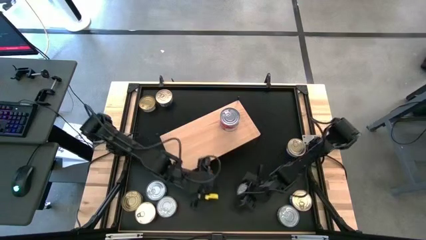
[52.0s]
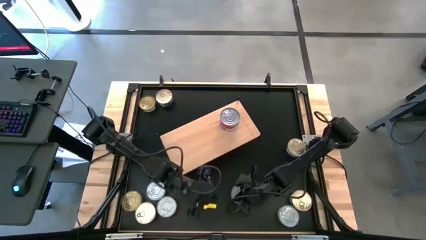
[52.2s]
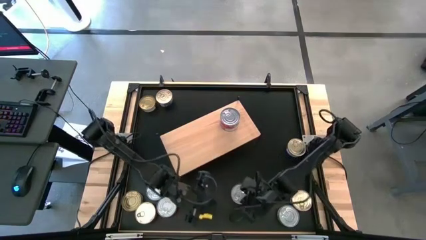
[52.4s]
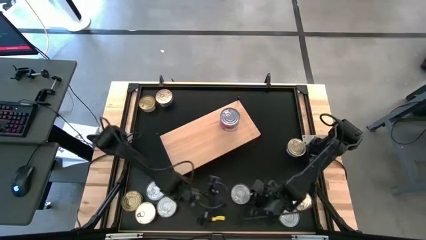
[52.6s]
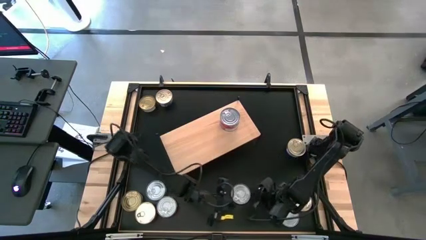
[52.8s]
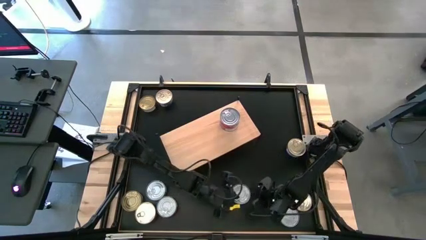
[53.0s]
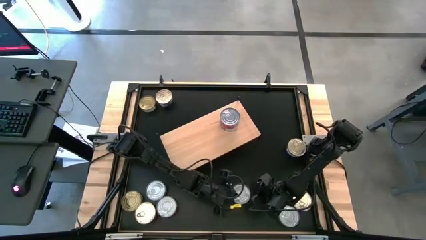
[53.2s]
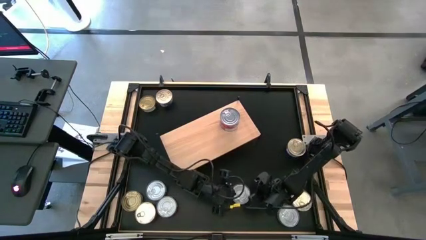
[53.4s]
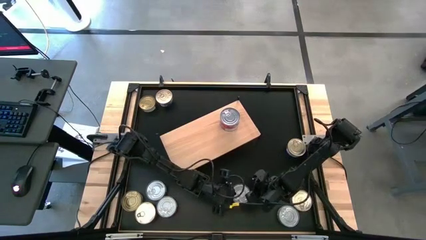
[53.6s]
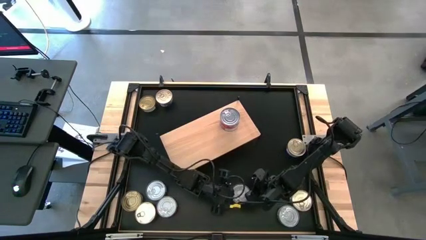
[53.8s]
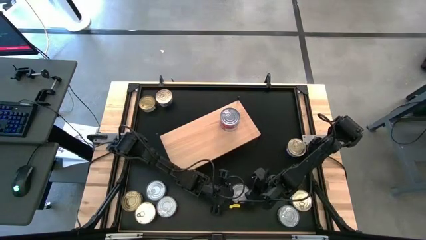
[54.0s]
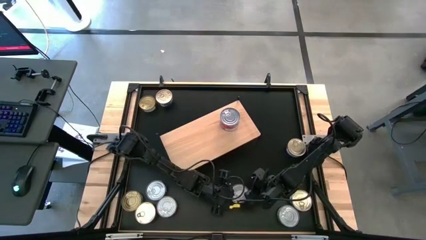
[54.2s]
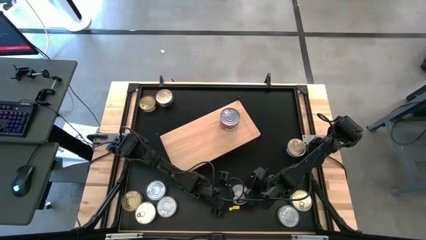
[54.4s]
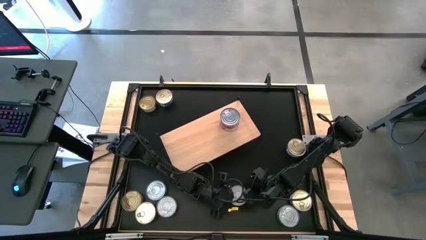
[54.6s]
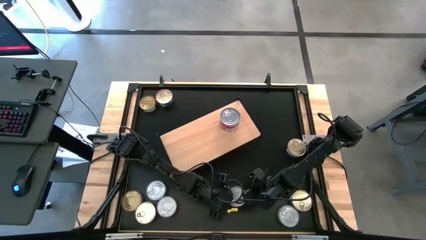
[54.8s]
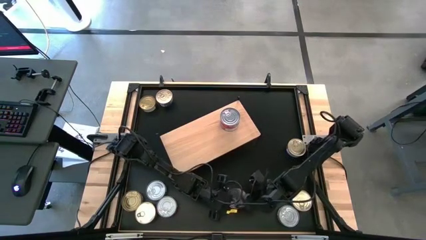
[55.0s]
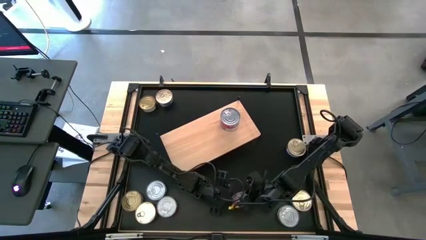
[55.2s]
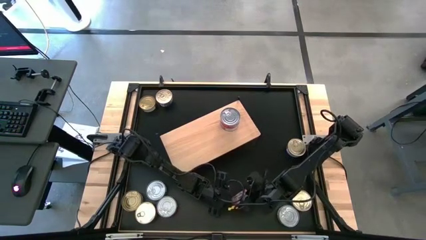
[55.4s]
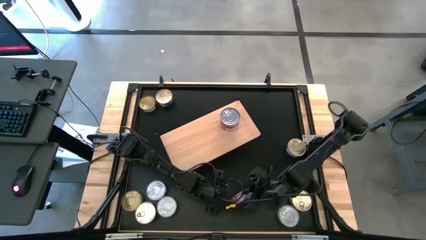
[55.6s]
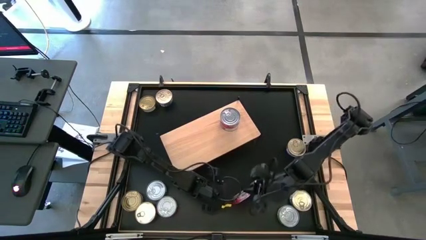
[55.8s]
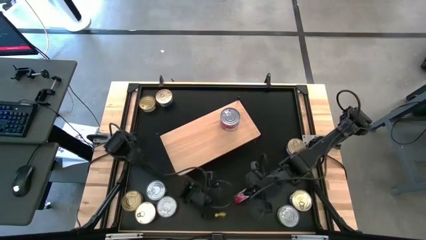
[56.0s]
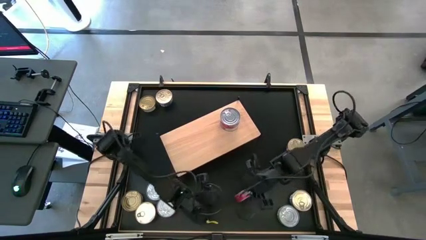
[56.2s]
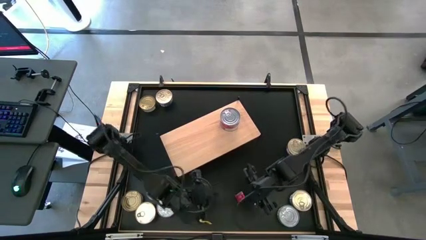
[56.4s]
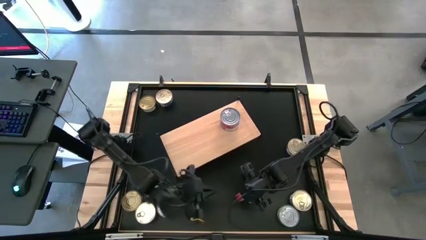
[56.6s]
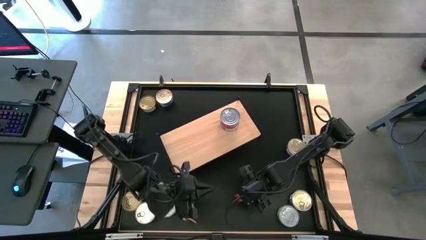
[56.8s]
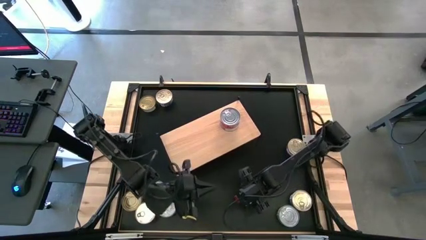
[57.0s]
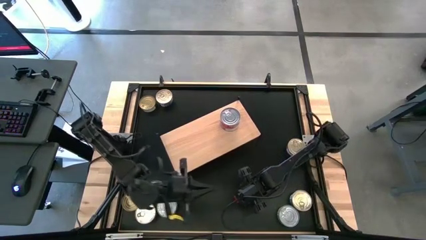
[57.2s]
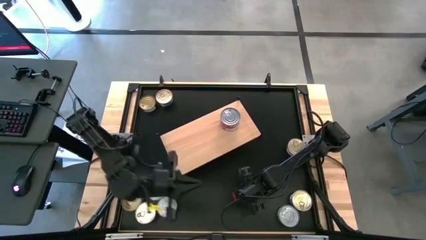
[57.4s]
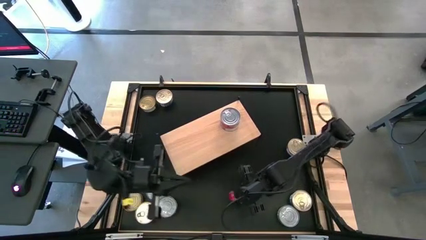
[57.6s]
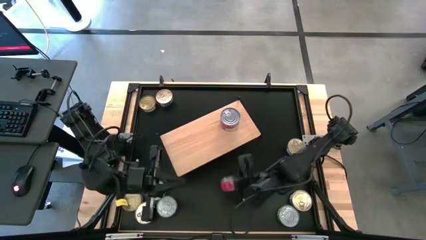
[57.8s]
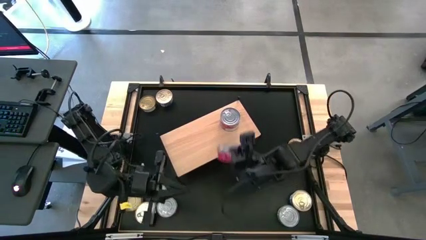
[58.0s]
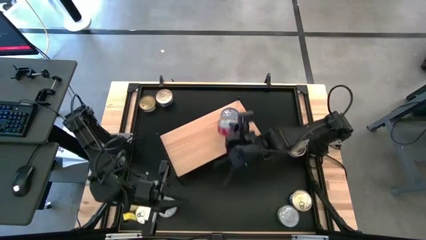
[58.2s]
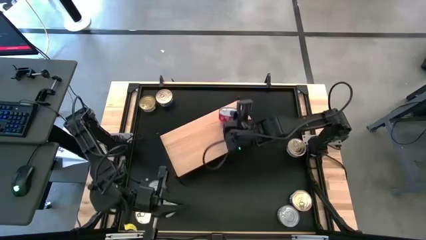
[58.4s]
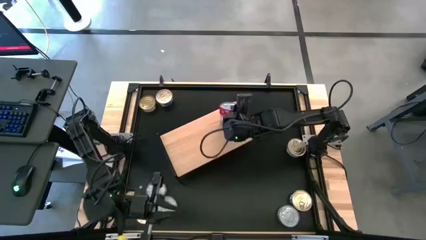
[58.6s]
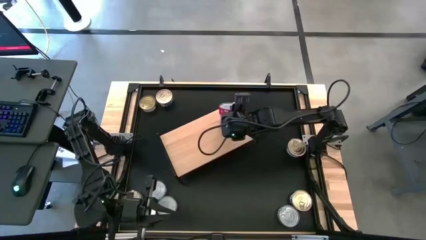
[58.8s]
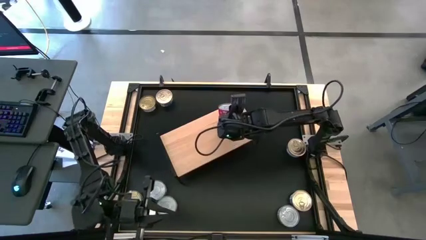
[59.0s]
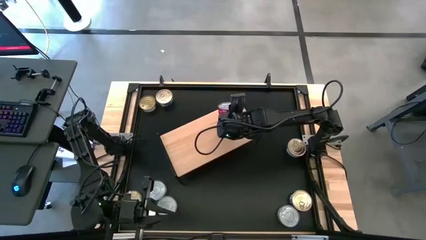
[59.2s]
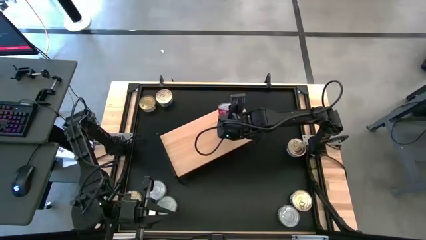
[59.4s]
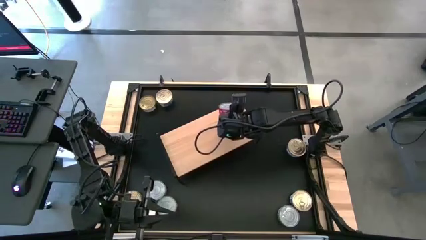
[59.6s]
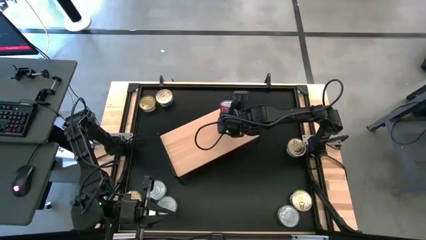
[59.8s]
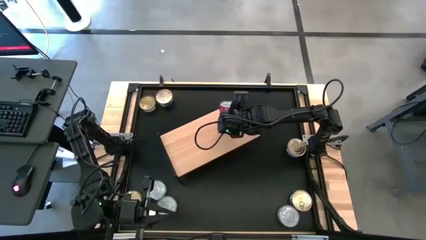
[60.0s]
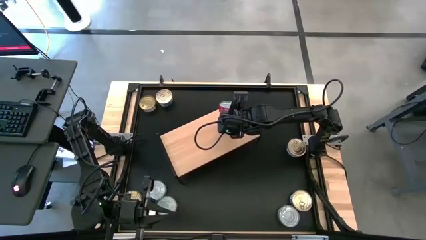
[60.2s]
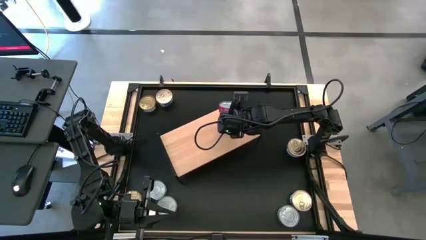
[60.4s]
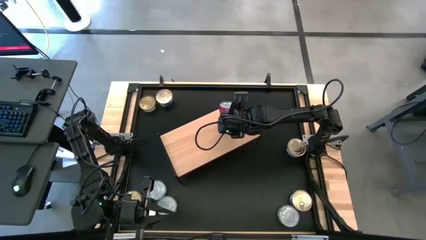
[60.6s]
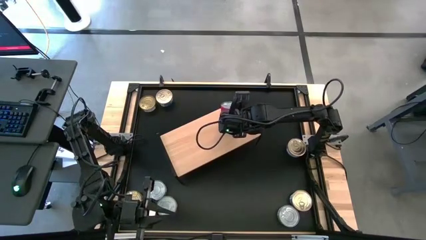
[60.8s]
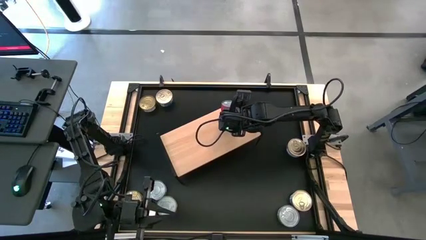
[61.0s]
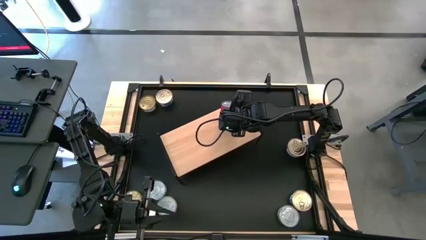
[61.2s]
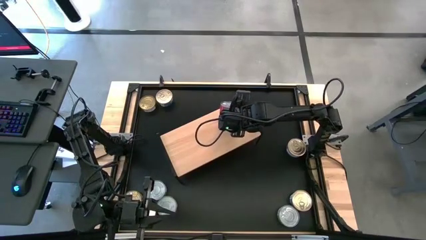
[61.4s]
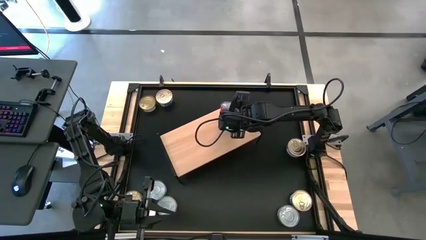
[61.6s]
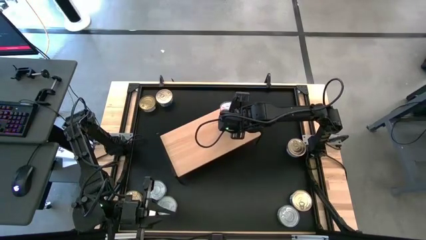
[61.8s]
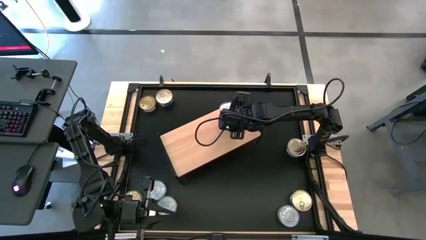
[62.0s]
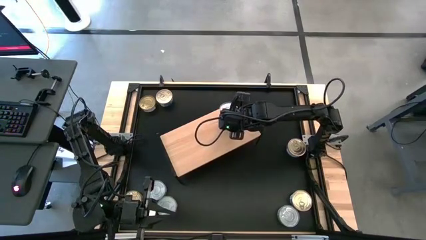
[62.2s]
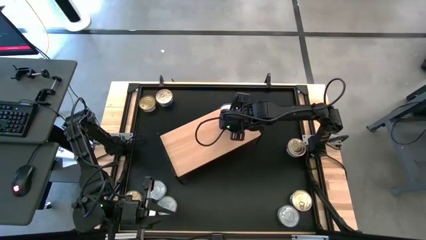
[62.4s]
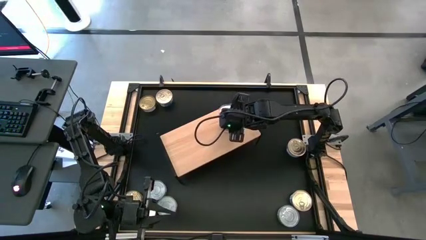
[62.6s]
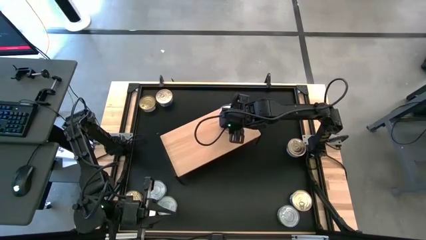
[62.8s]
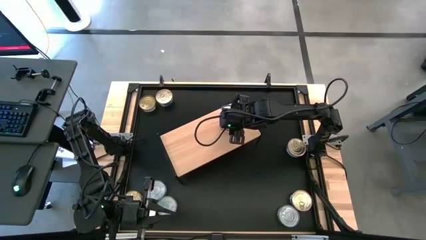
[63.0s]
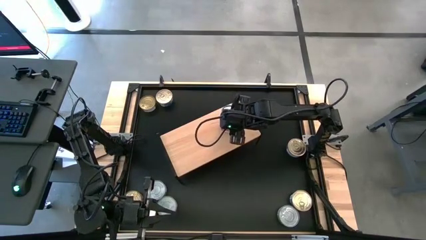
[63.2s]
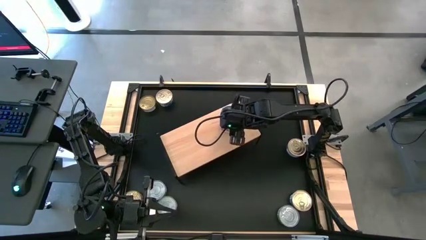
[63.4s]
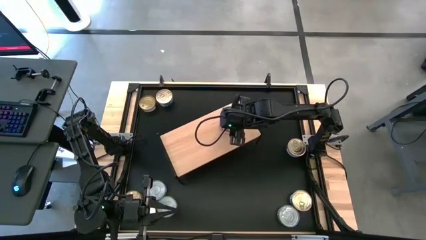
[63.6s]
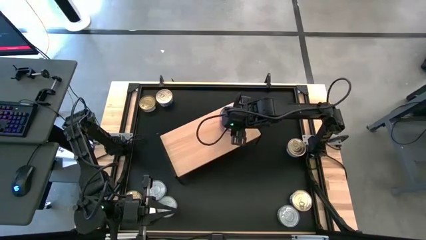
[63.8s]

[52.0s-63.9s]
Task: Stack canned seafood by type on shelf
Stack the red tuna can on the top of the other red tuna cans on the shelf

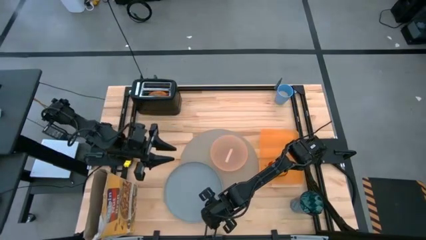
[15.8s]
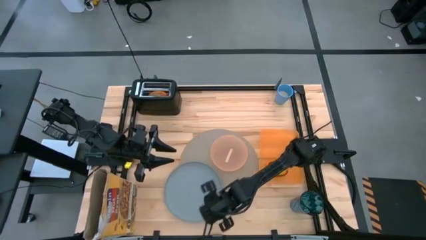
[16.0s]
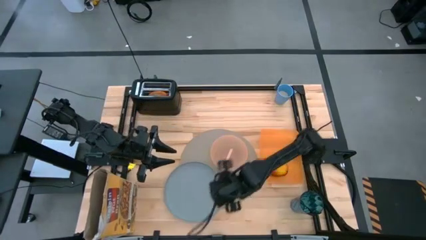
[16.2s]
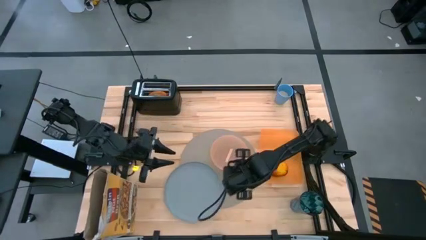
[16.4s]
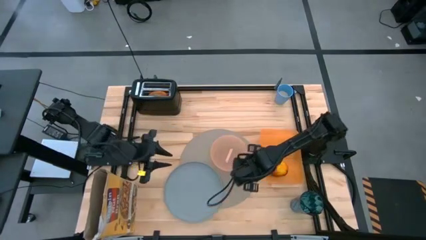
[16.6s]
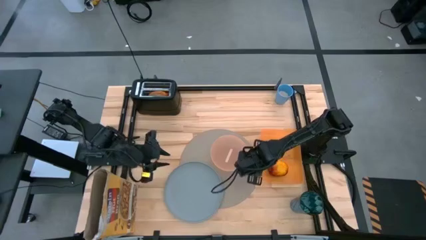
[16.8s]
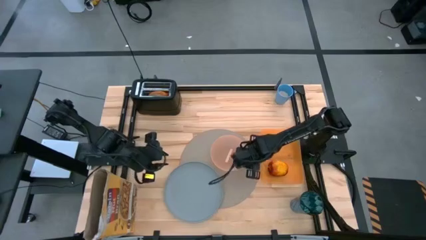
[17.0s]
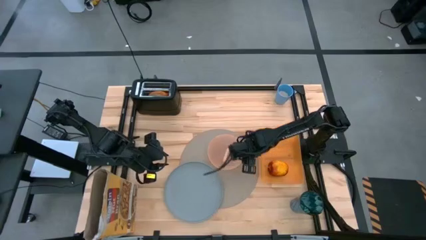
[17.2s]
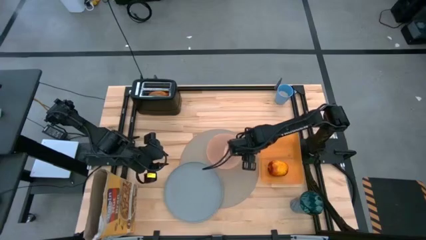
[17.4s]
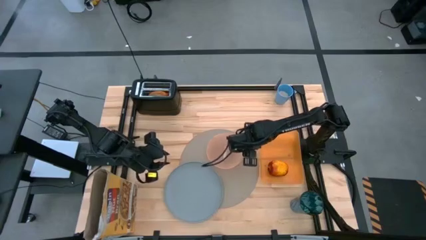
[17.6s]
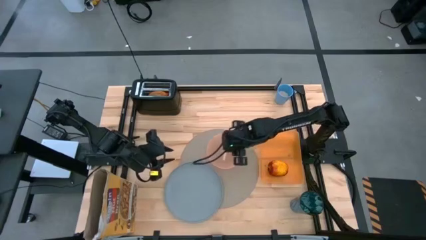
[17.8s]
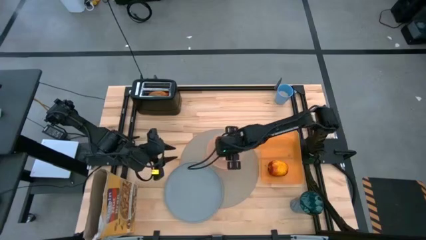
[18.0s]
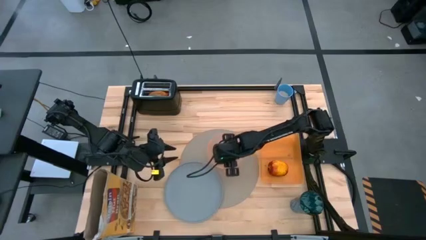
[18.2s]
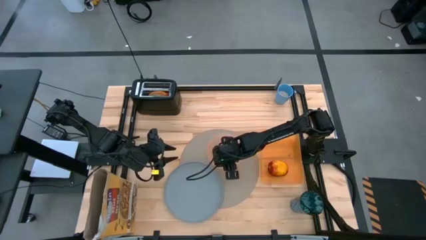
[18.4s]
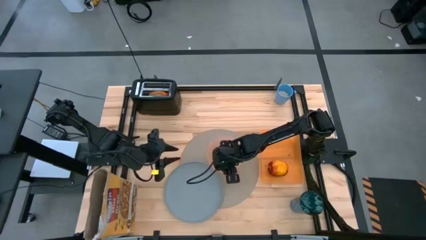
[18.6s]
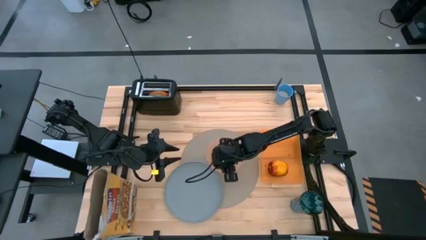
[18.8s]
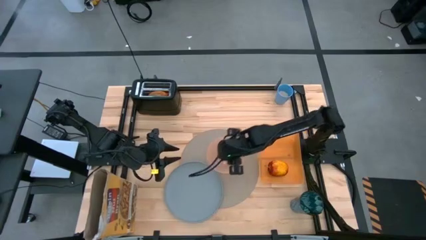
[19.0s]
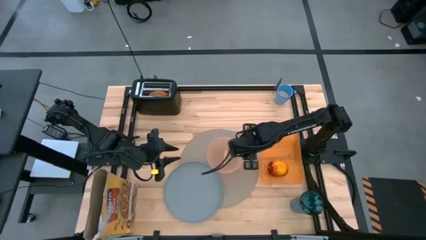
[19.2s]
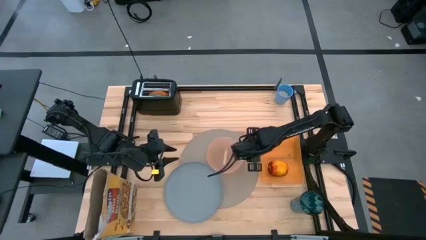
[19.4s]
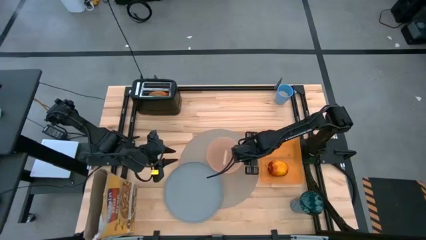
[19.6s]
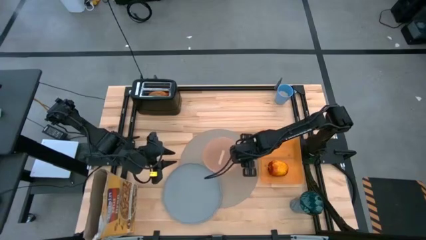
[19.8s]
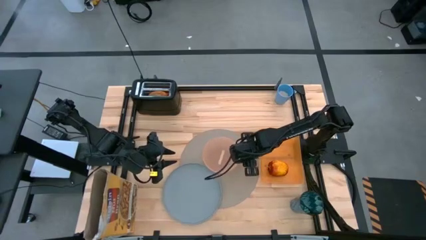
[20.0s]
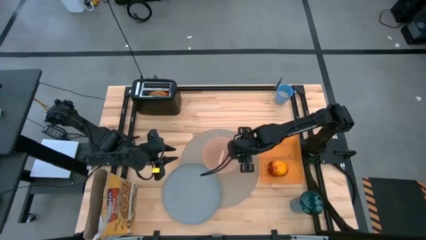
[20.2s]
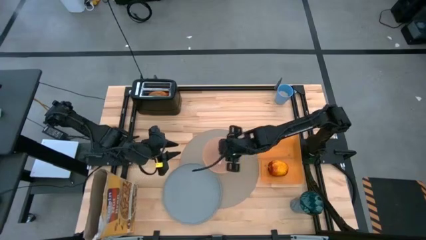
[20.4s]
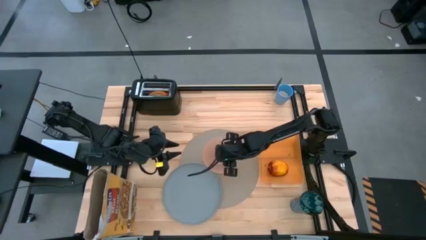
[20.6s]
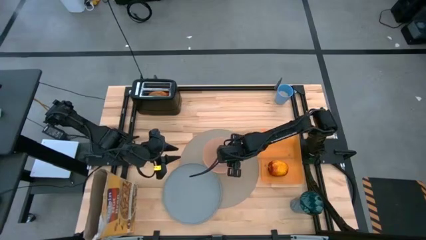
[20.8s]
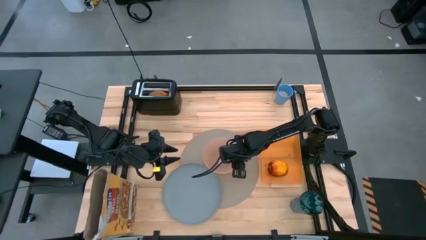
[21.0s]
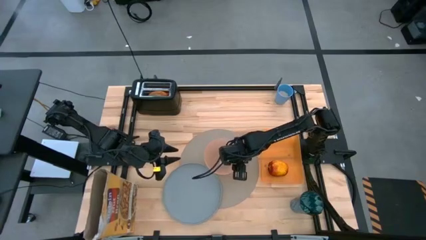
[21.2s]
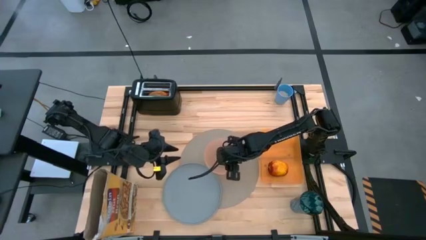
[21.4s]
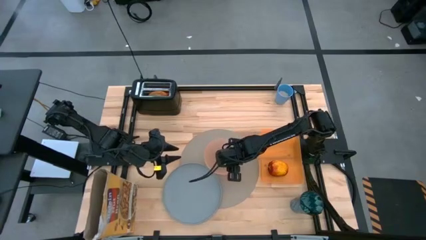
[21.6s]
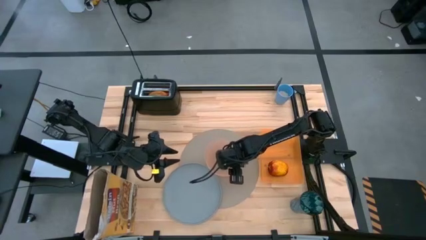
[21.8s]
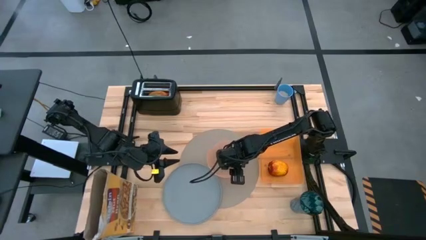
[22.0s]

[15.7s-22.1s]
Task: Arrange a breakfast setting
Adjust the light orange bowl on the gray mat
